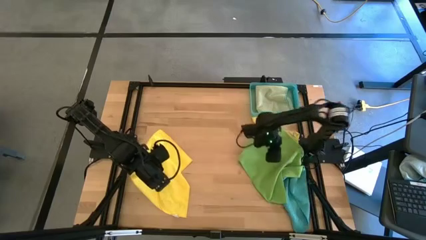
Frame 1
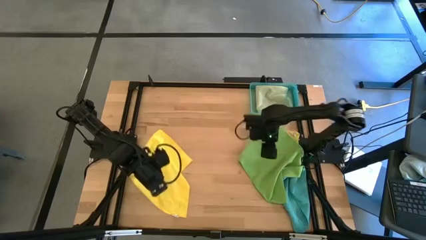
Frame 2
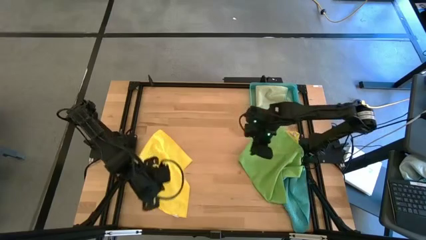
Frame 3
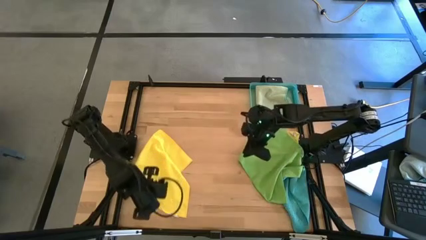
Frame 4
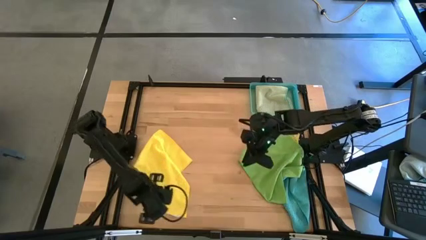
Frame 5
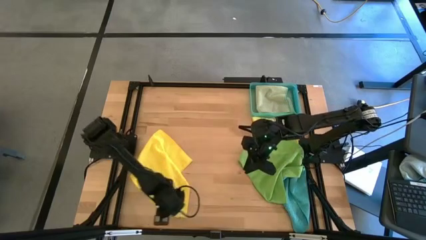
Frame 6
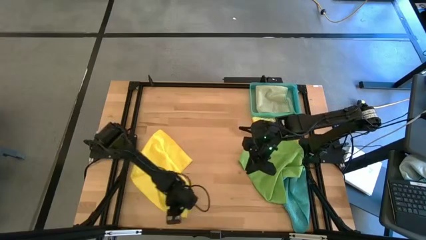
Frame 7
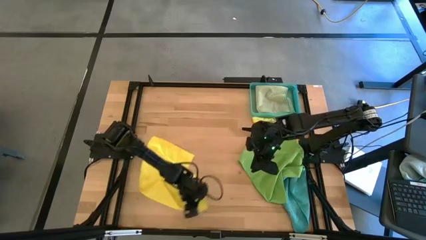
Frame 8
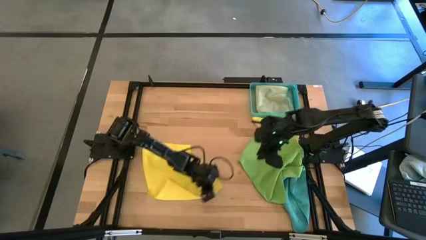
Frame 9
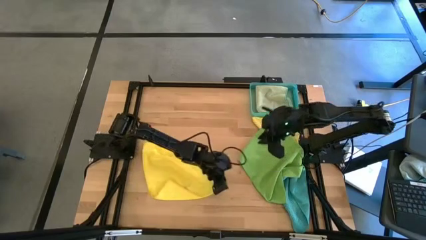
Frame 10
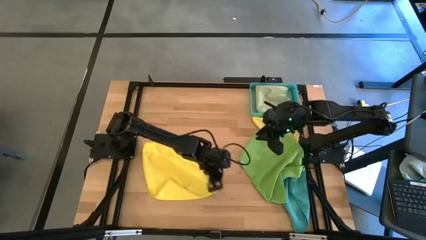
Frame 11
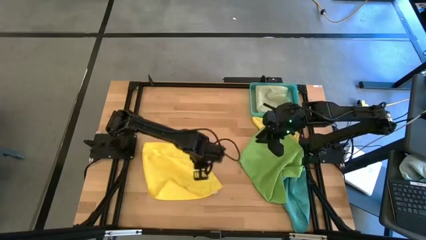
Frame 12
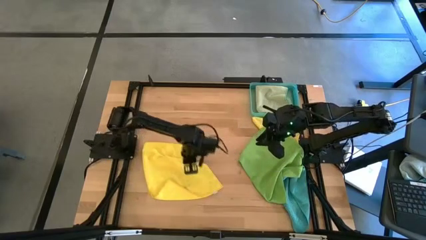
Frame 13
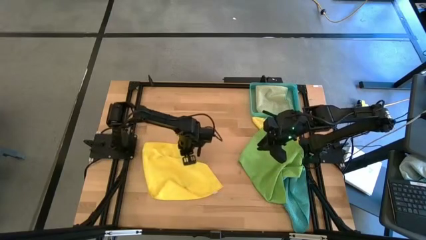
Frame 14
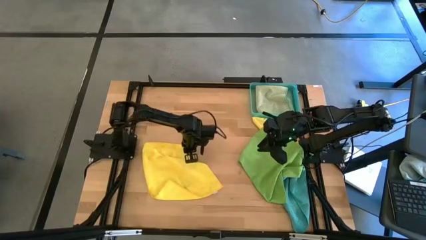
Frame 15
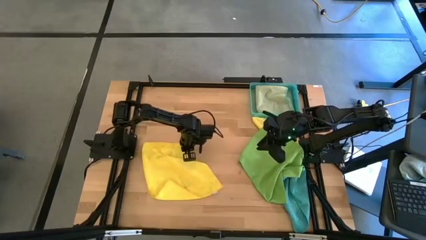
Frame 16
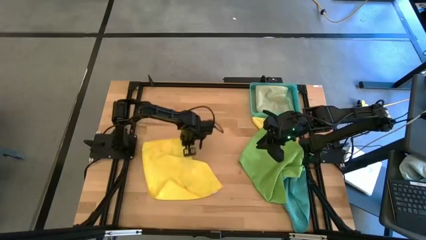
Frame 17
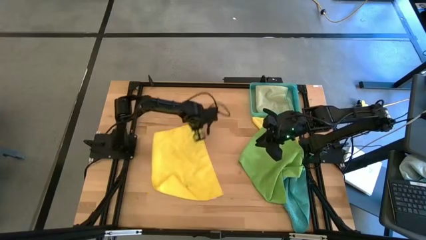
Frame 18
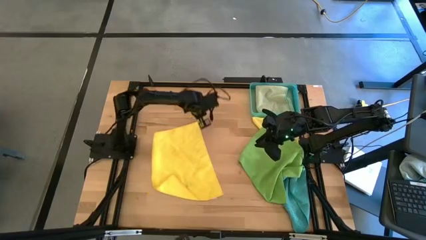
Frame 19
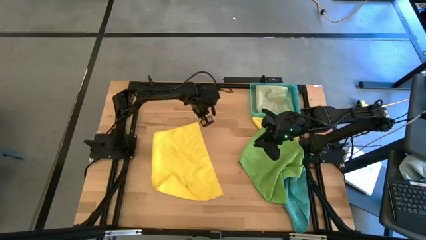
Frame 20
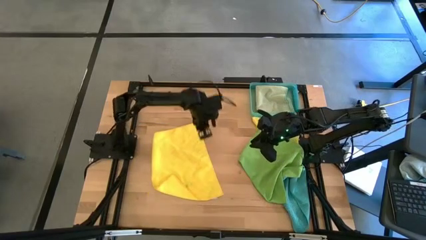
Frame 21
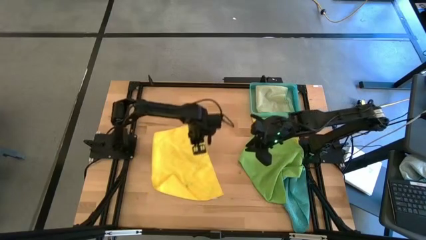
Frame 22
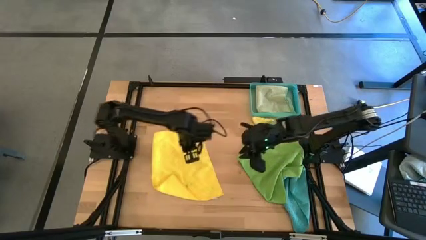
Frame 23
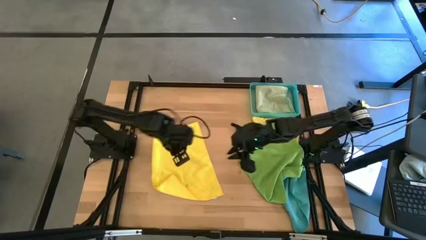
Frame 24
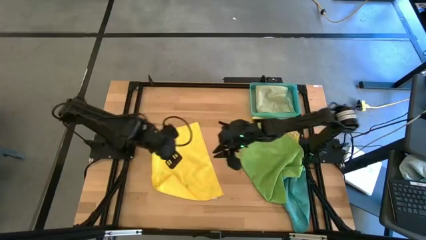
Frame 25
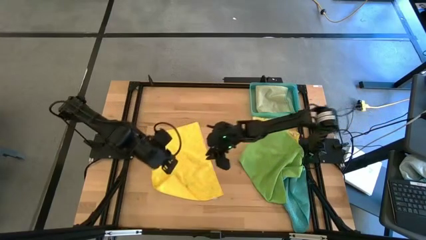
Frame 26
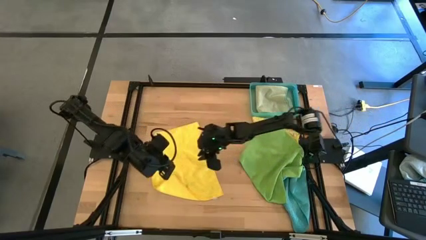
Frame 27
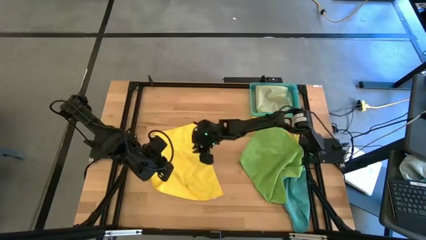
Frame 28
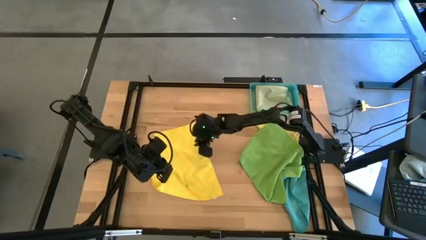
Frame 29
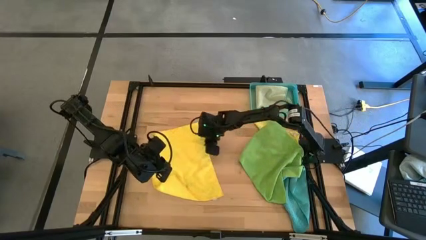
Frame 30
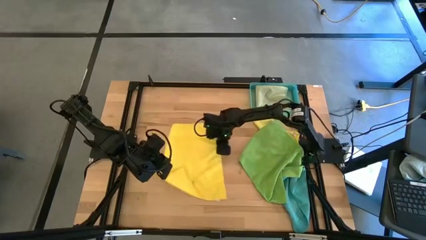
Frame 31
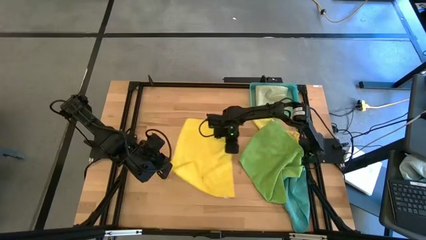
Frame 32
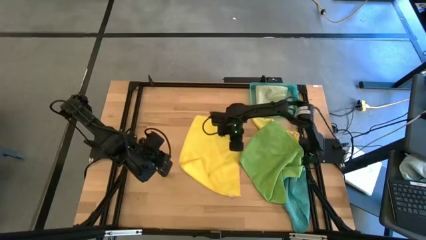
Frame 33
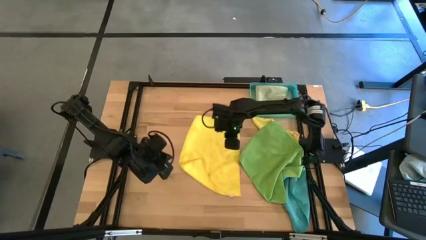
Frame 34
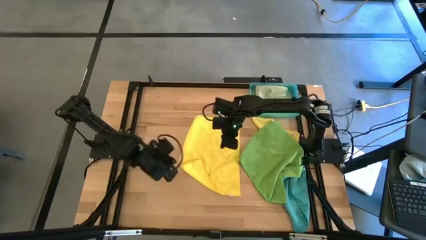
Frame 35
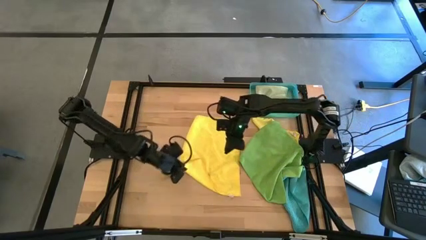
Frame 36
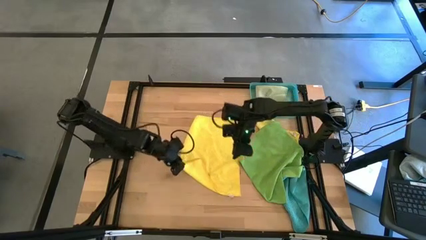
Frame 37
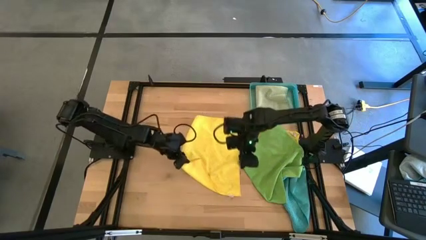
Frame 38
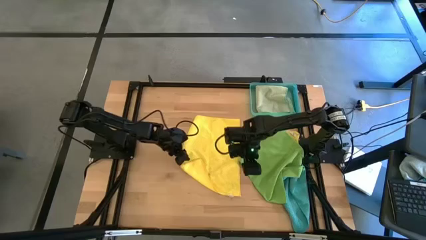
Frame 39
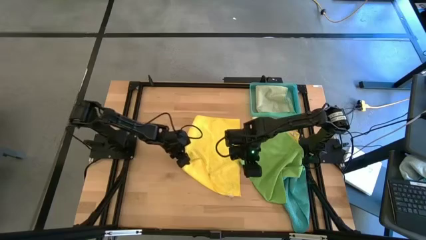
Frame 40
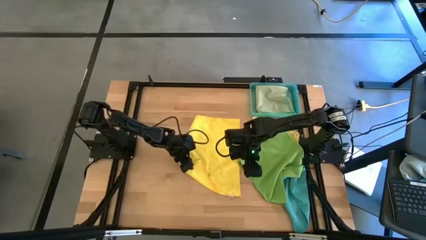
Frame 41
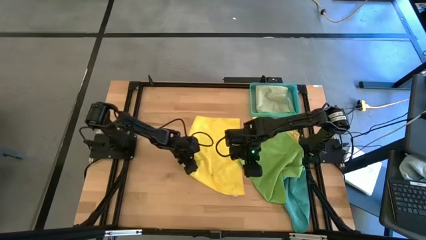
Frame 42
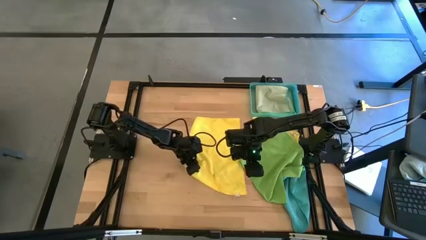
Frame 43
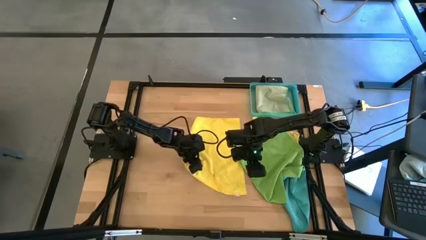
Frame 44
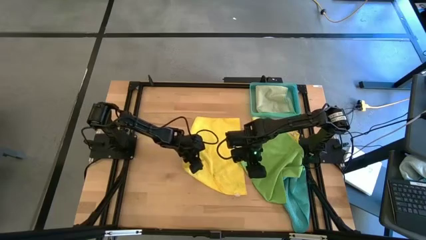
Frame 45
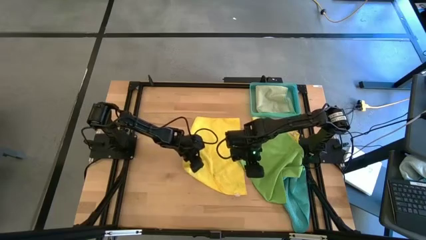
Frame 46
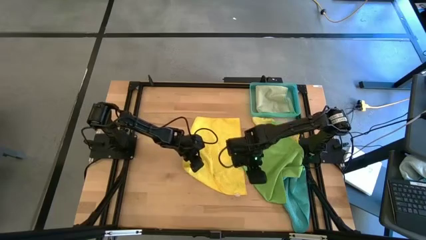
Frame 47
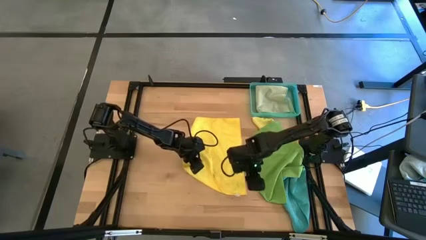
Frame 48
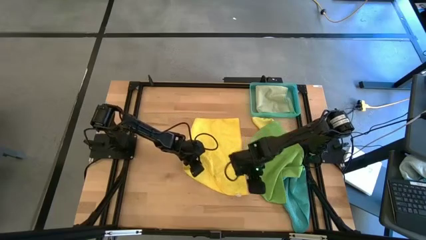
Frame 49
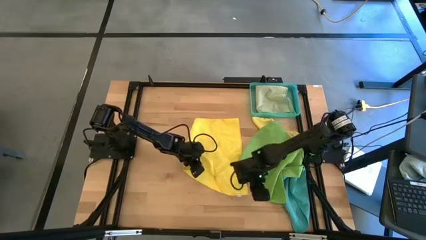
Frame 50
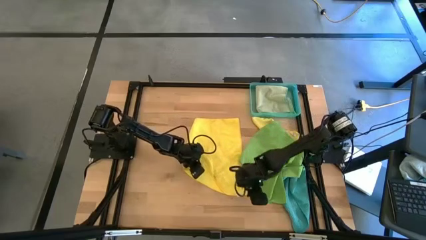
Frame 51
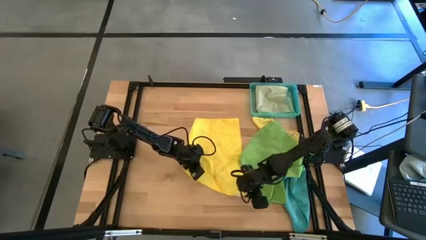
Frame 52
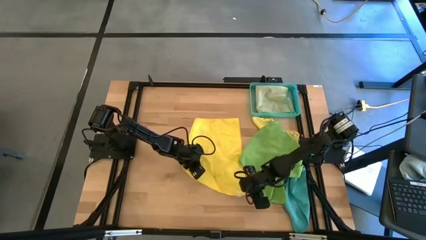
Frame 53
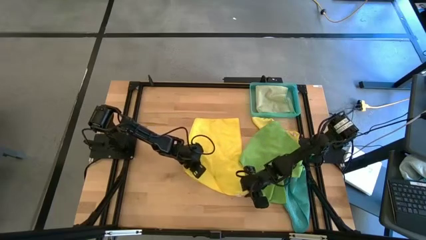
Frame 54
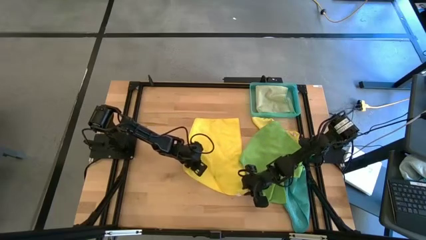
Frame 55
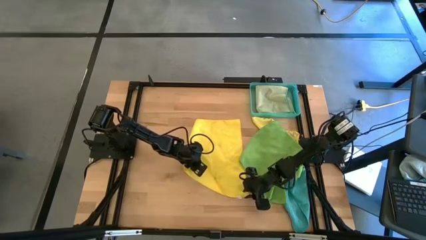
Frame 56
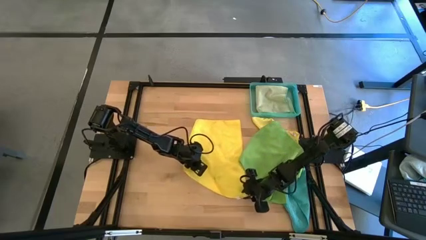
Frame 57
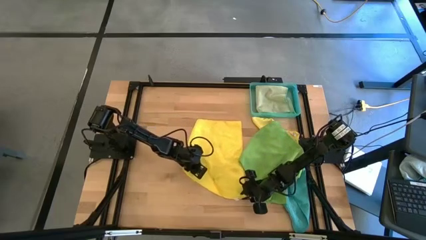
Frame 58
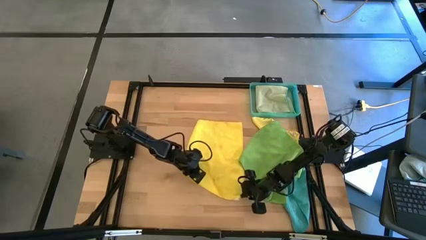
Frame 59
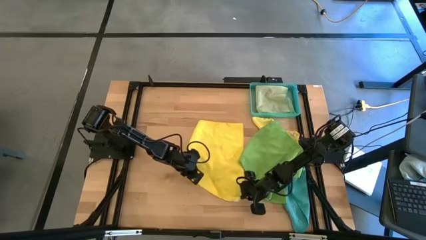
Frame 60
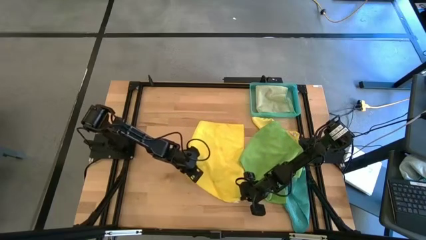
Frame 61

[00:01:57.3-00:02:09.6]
Task: Fold microfiber towels
Fold the left yellow microfiber cloth
